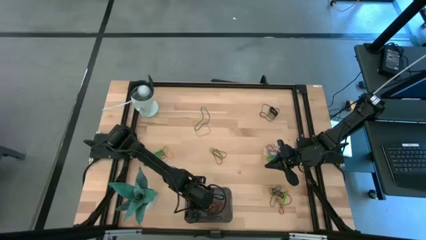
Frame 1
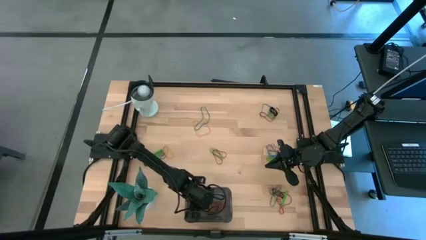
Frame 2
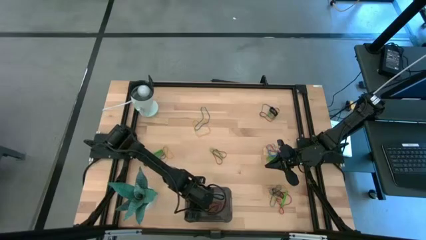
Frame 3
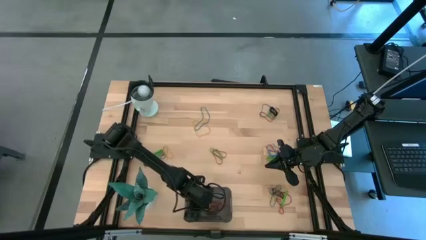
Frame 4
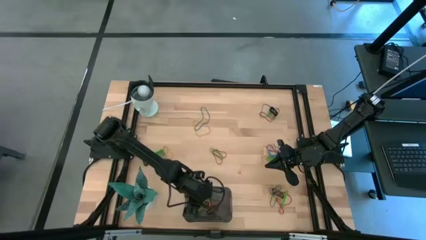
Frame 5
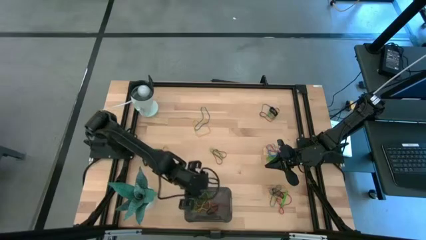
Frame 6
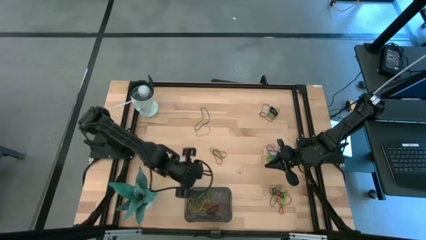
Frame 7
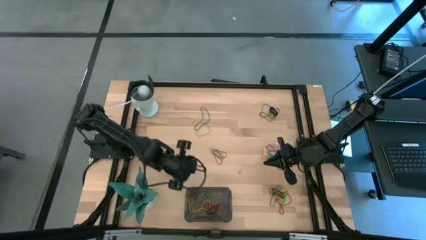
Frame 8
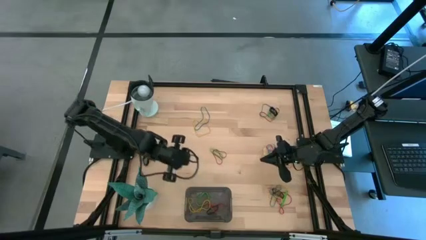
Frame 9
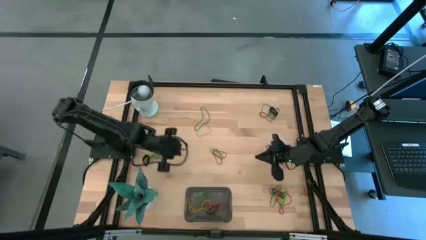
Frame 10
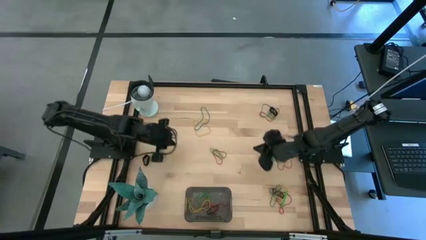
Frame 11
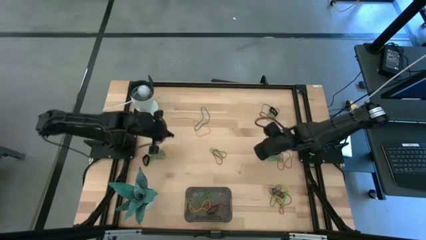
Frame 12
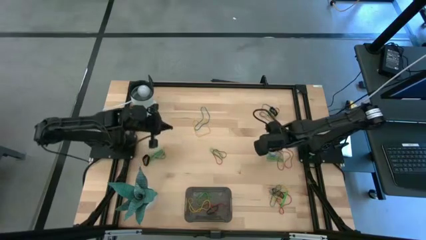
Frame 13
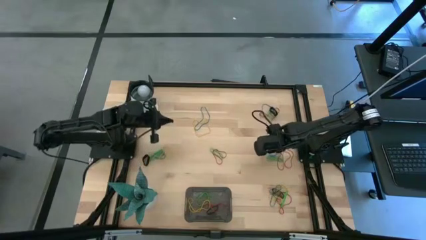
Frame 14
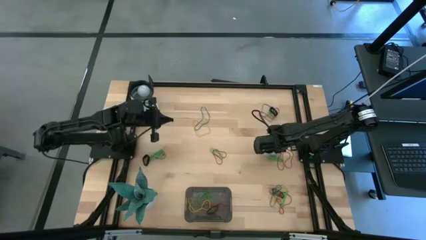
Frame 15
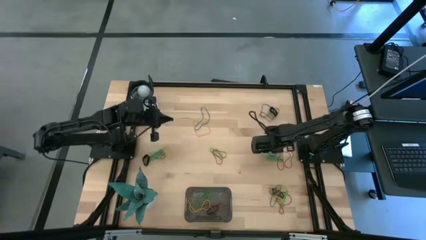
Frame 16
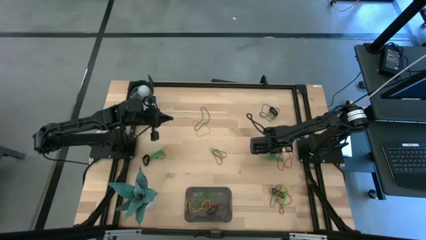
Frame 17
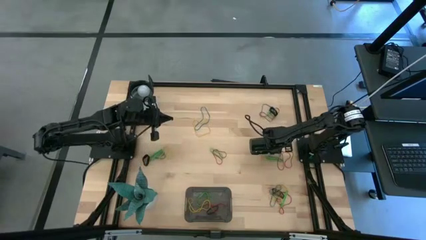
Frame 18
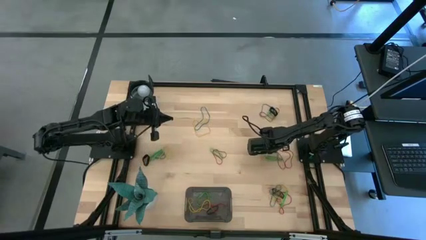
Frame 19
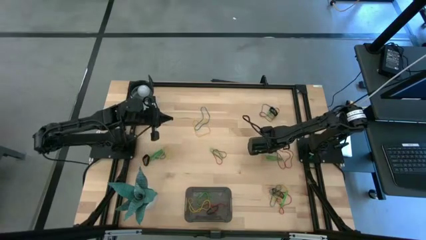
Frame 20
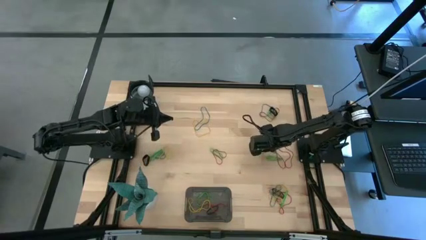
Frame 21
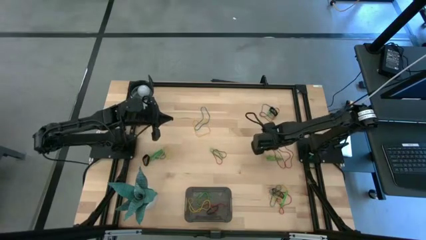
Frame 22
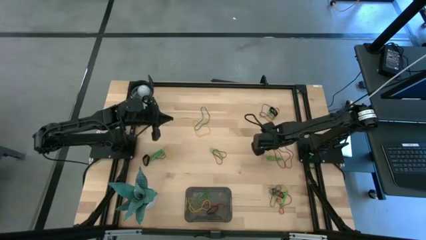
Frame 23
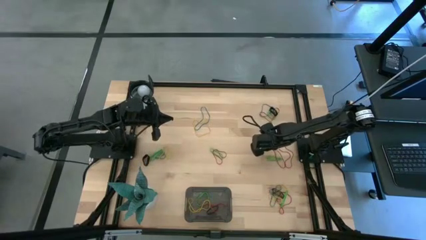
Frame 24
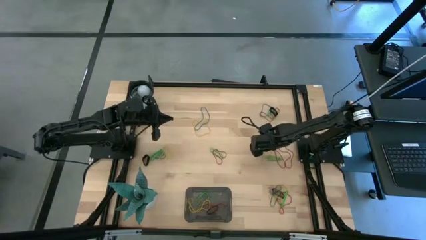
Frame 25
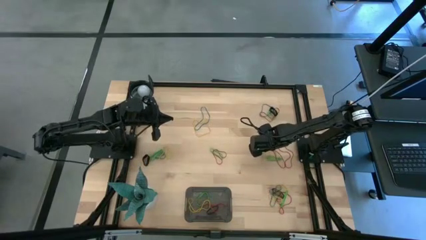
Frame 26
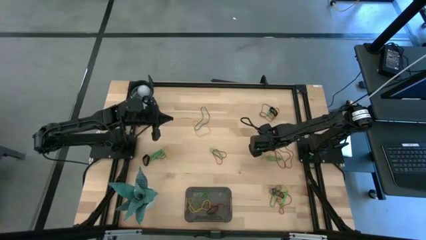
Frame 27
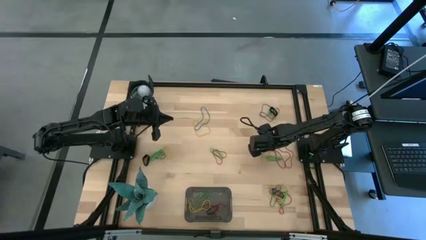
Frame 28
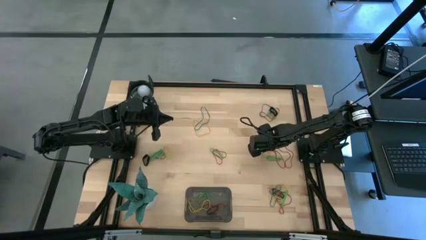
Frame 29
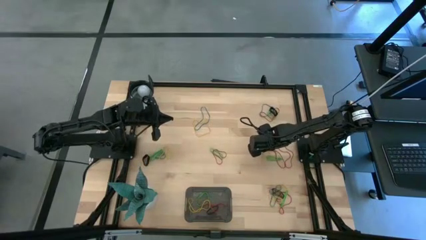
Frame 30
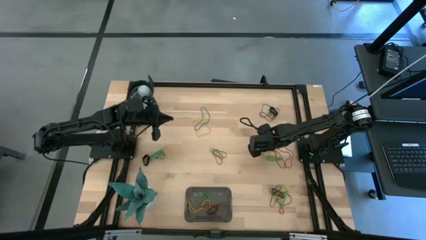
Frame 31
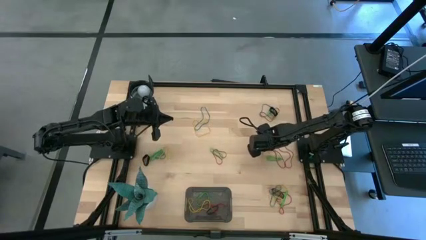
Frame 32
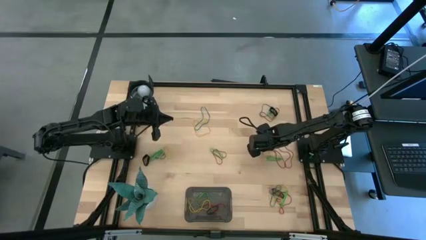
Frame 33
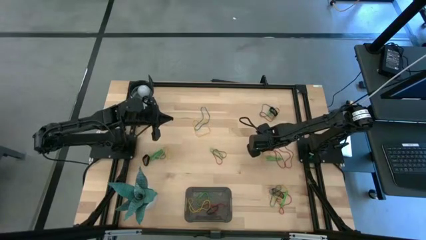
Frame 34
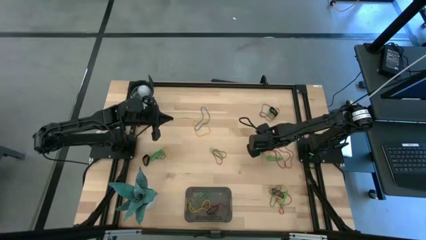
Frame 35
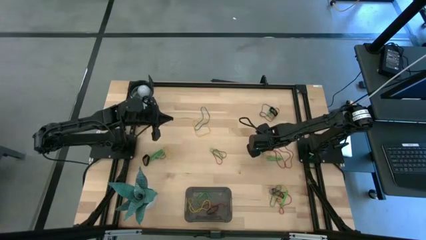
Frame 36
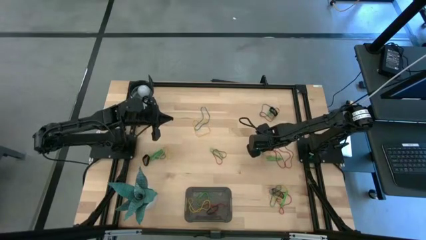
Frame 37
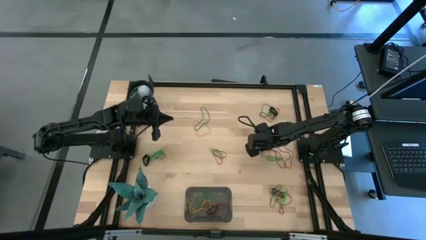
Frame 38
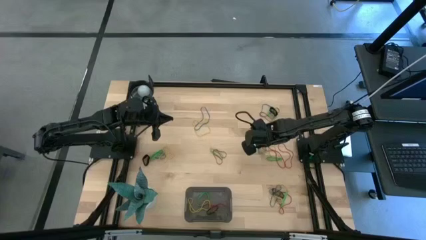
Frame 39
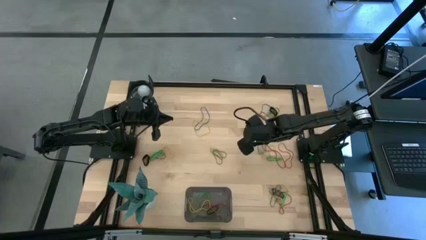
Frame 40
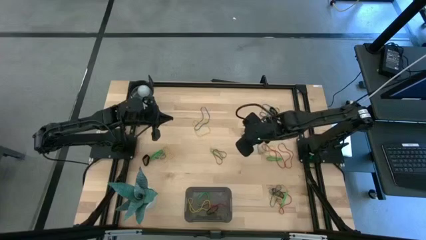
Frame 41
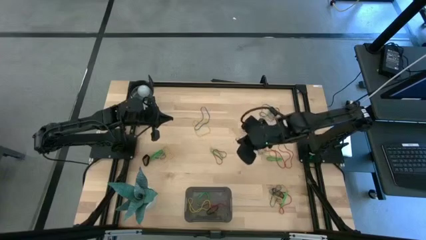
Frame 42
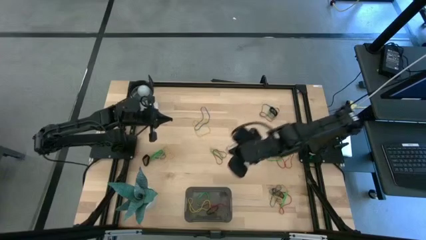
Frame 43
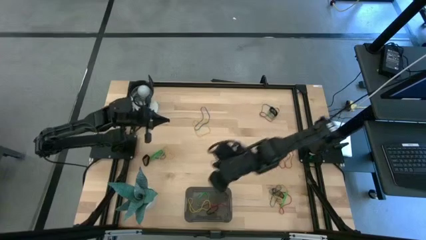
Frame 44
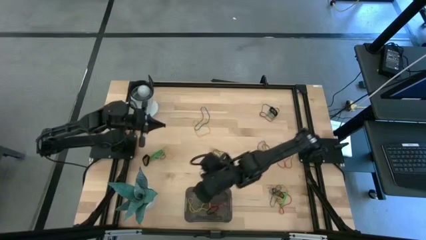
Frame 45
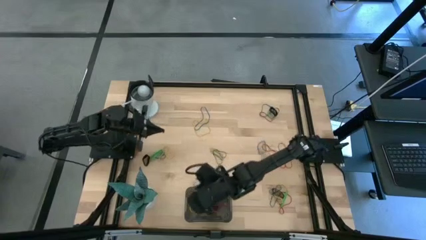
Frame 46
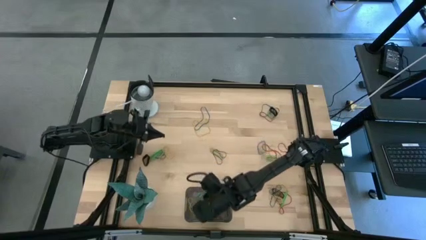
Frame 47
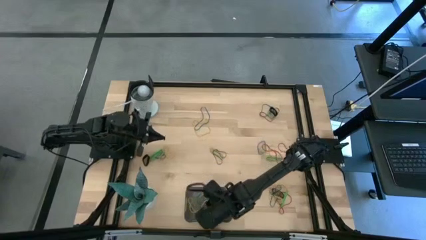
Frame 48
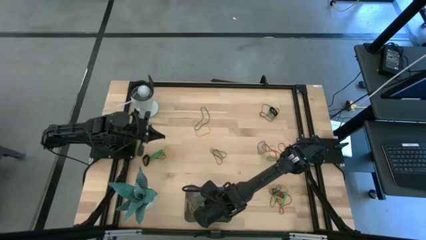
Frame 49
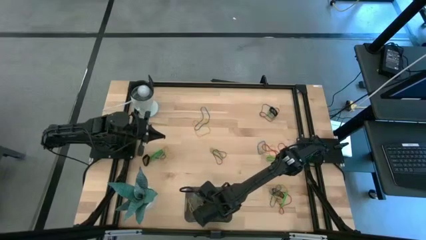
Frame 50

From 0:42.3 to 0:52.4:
Task: Pick and place rubber bands into bin
Put the blue rubber band into the black bin

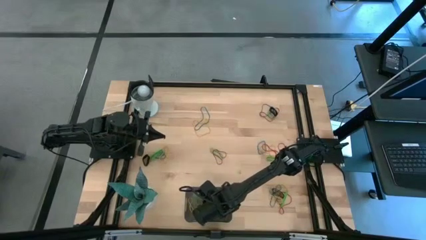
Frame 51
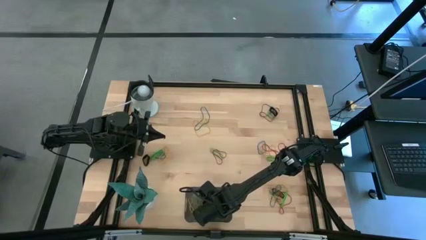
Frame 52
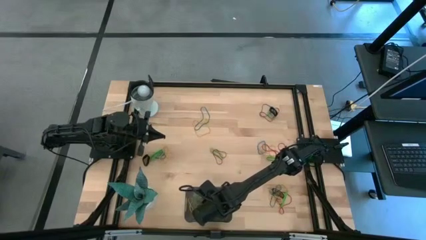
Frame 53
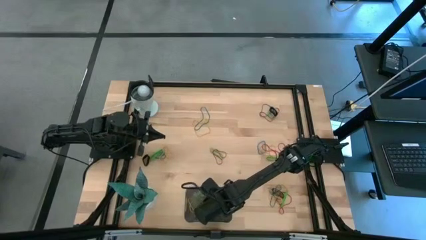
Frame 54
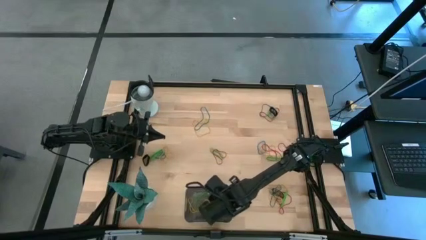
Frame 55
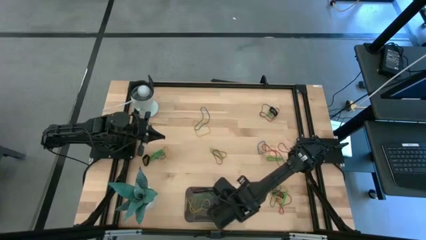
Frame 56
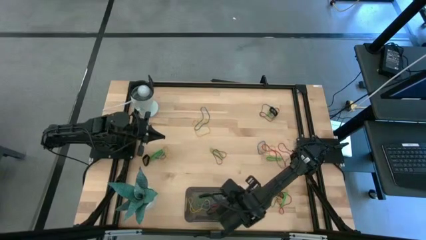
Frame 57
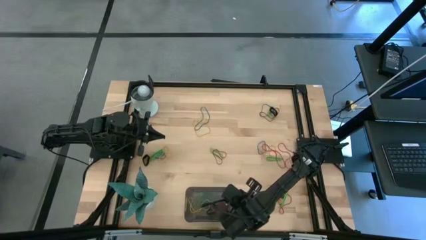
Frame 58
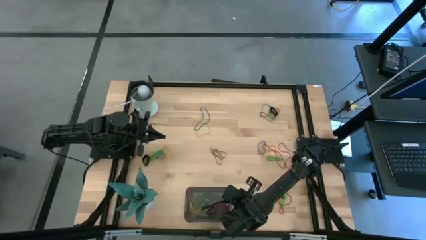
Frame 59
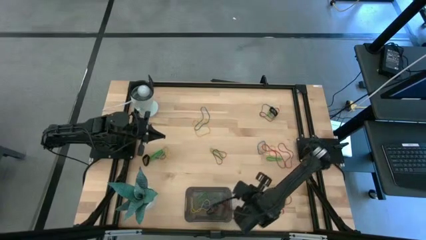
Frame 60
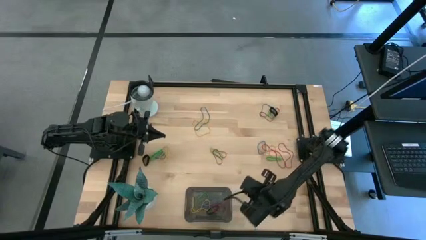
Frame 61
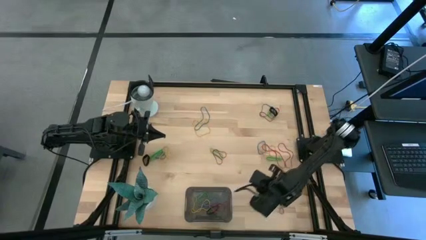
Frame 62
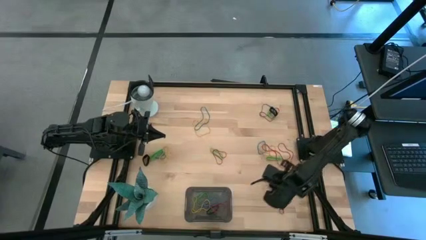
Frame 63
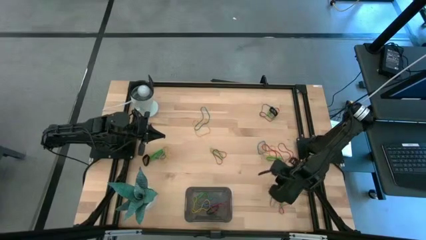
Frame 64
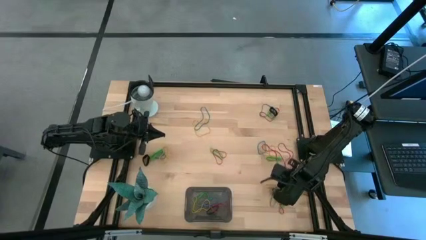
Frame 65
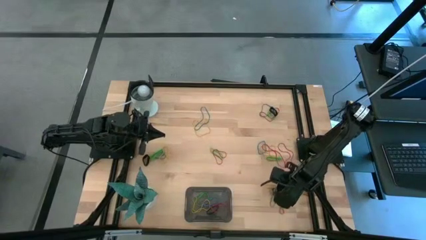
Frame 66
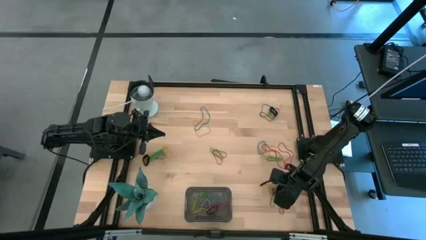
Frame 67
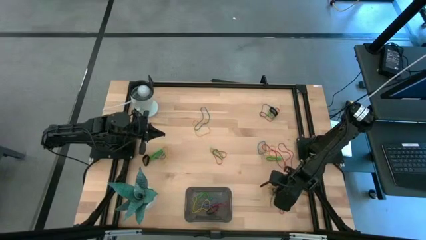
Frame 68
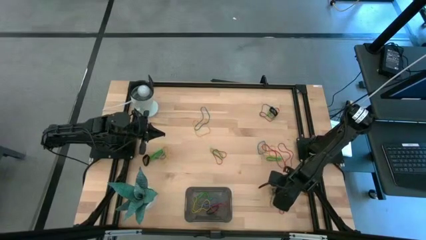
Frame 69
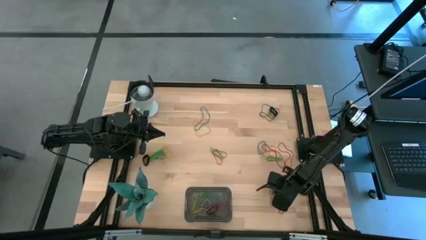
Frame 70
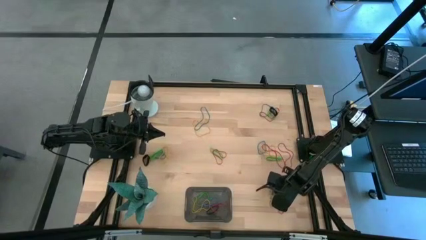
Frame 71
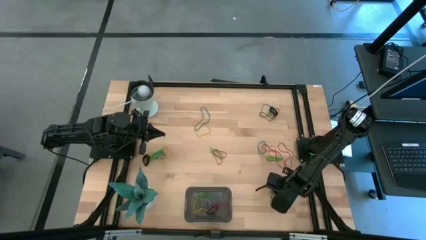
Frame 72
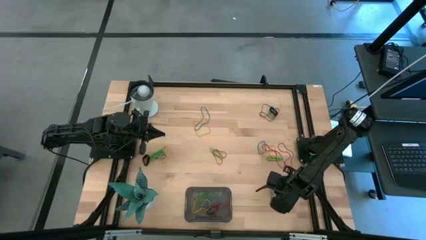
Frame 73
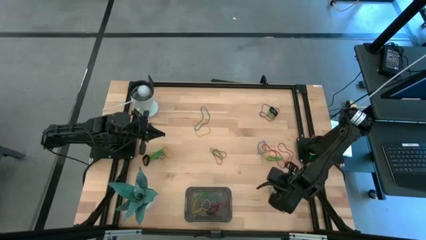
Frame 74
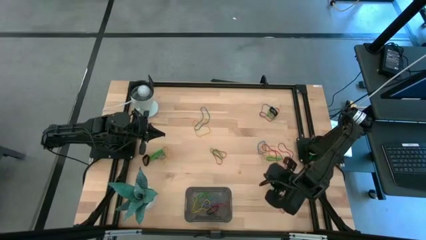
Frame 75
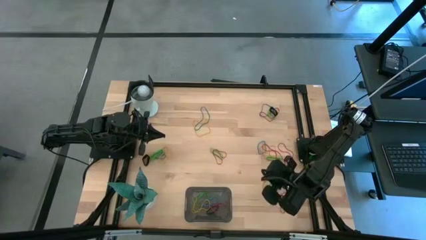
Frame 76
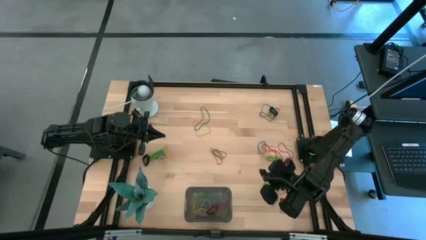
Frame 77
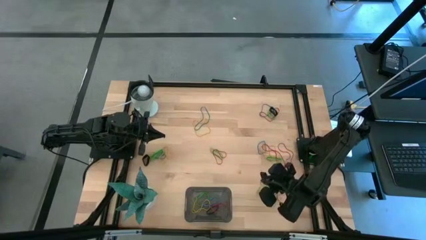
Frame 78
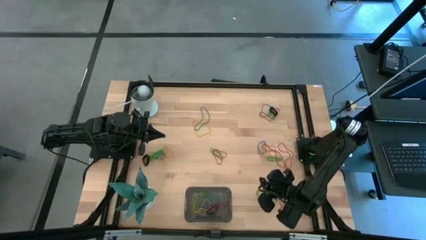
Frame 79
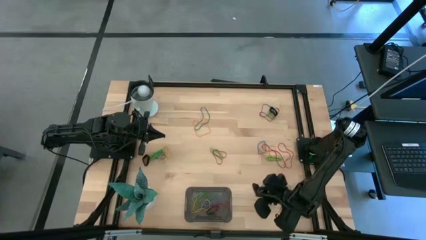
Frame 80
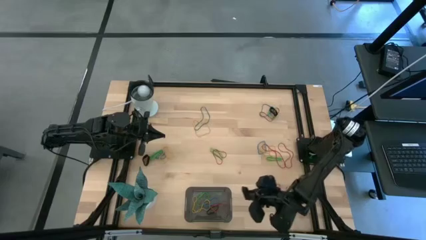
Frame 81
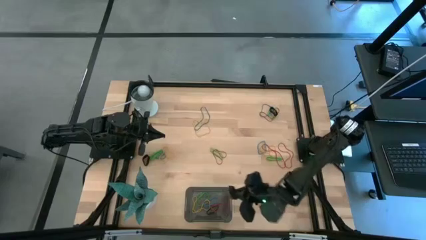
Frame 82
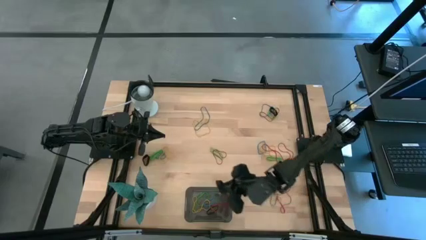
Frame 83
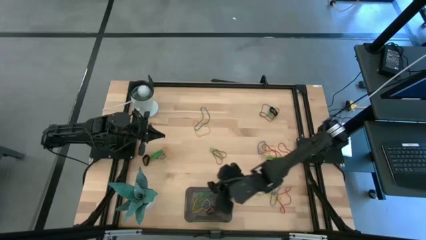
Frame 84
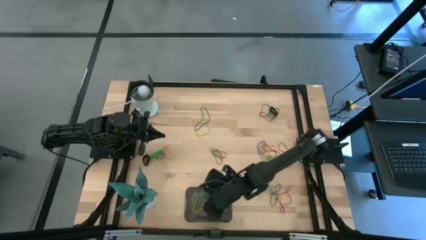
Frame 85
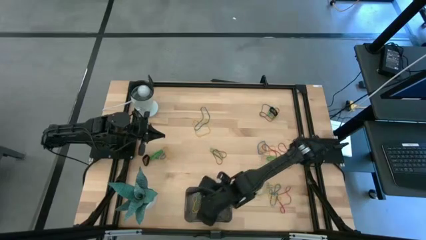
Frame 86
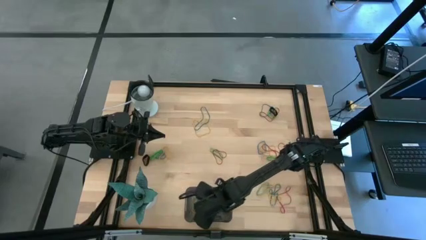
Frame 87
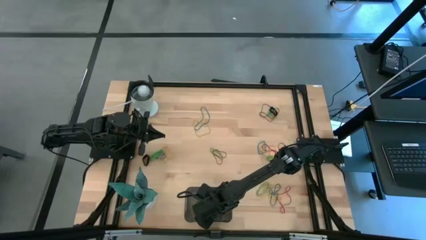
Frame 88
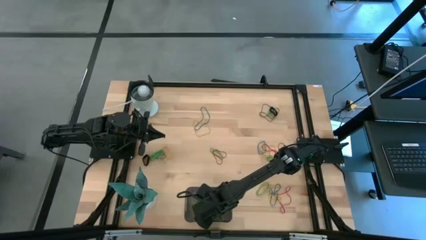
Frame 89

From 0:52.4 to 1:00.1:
Put the black rubber band into the black bin
